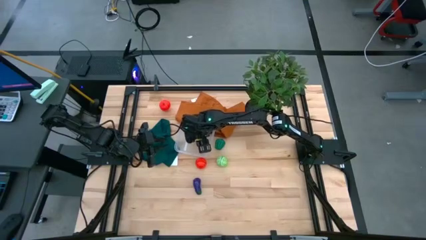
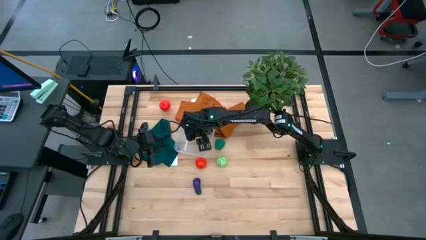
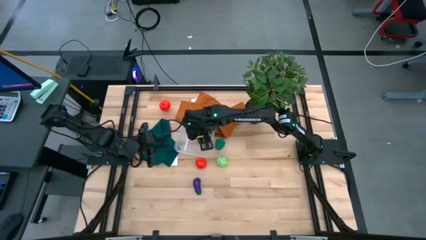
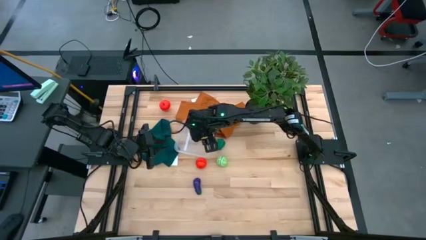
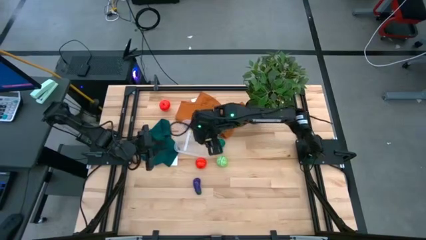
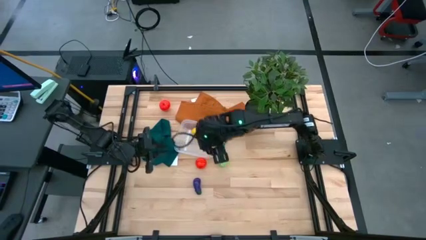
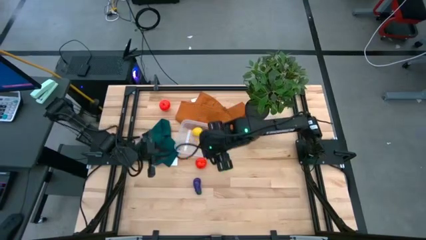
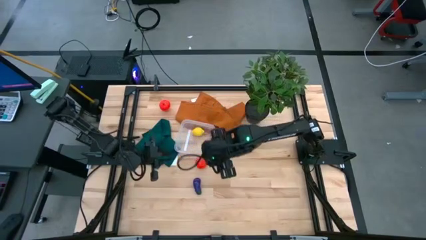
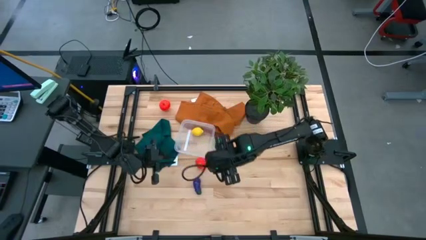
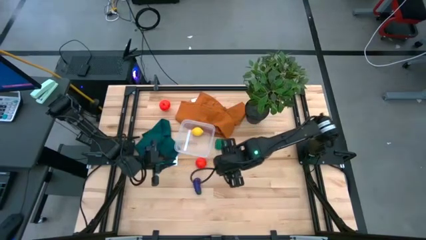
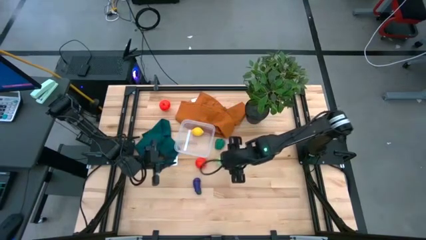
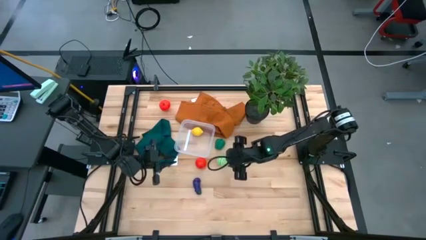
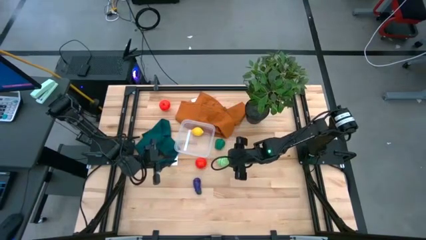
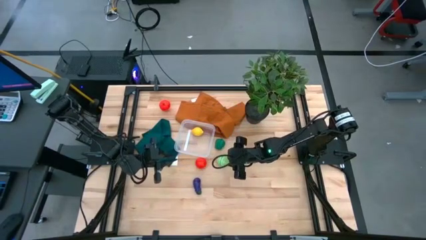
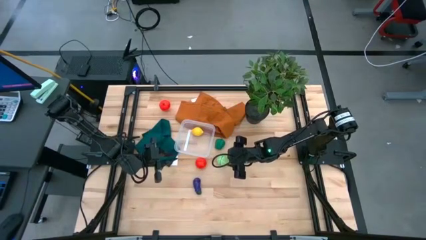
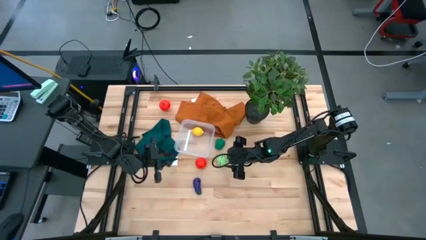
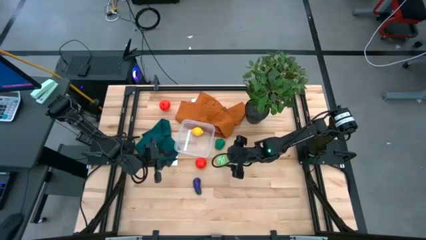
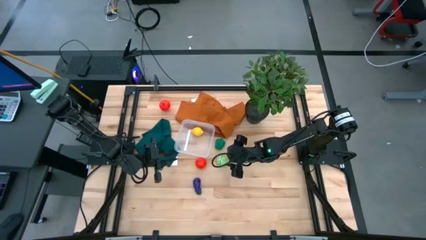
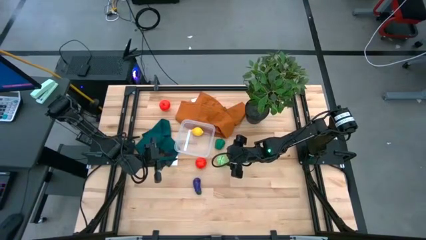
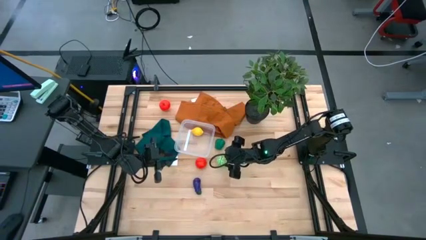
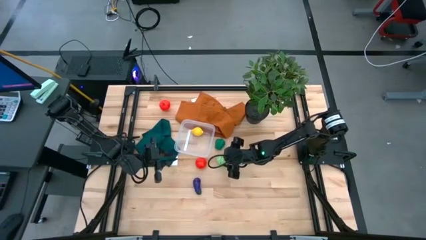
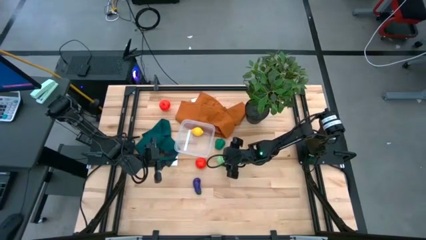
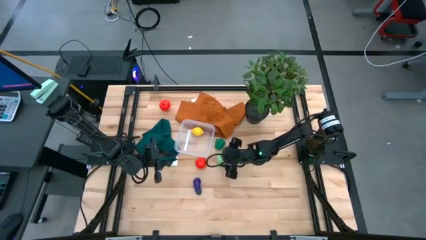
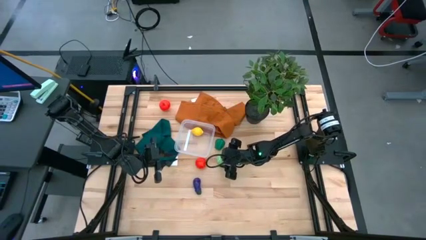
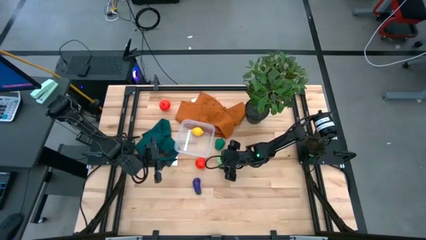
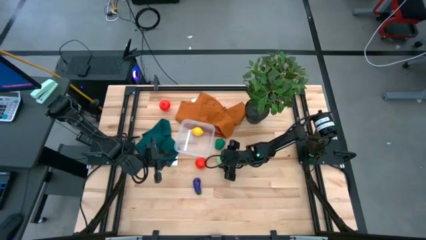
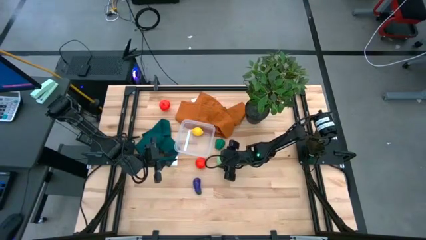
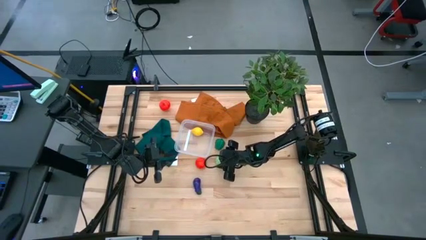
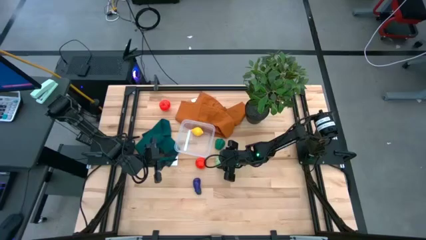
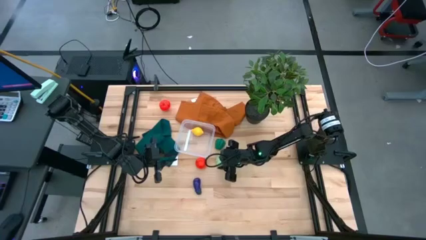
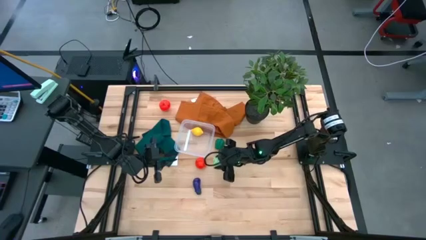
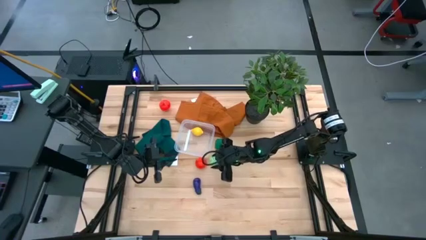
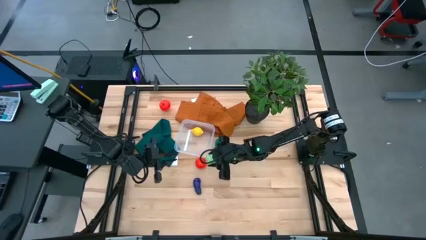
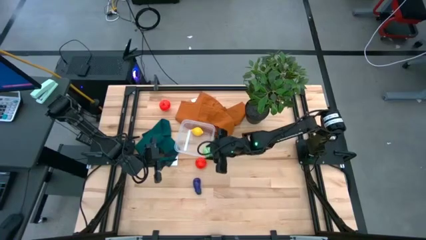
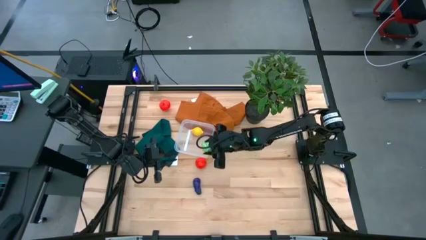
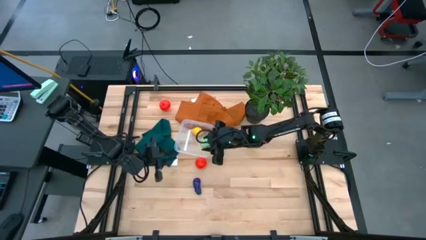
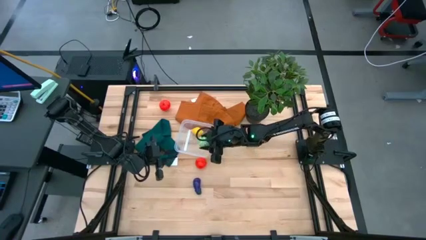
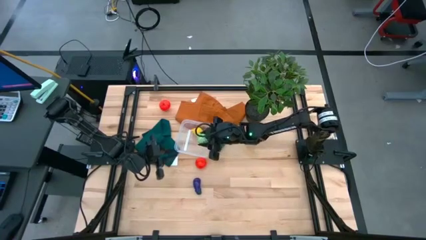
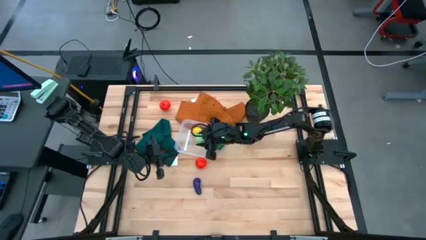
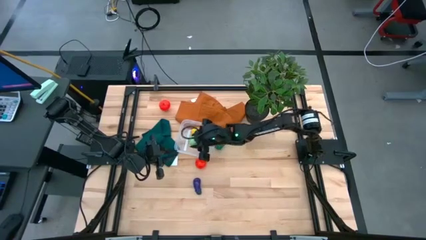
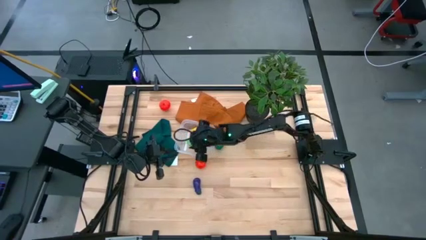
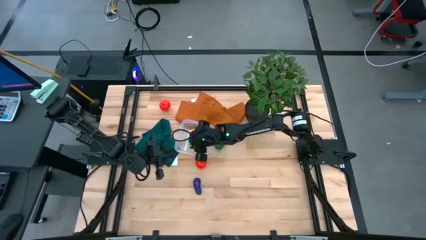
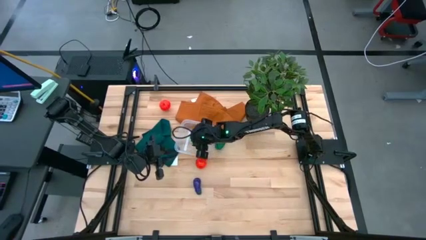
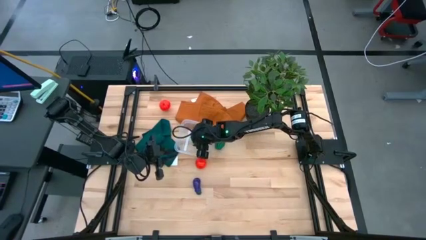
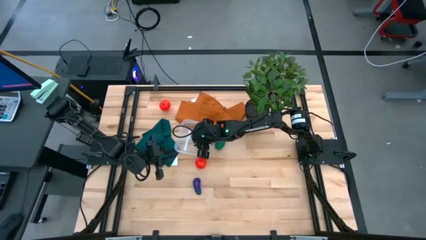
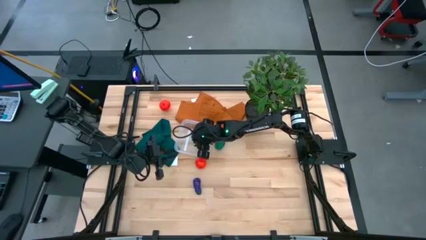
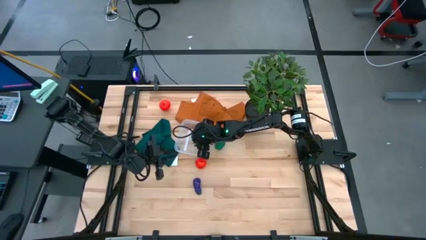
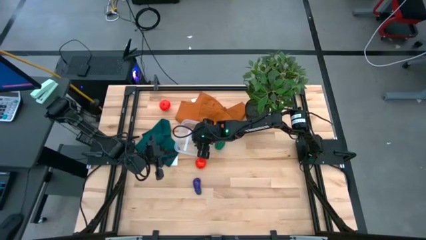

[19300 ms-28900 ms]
Task: Pick and placing Produce into tupperware
Put the green cabbage into the transparent bin

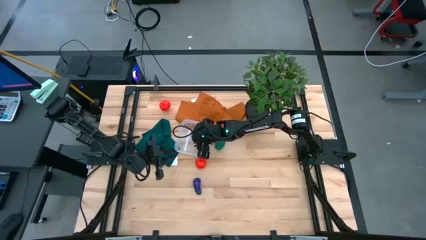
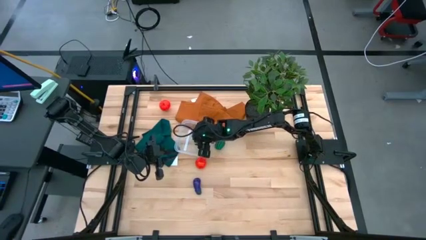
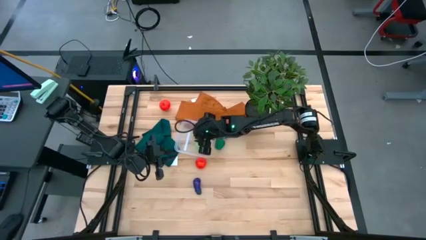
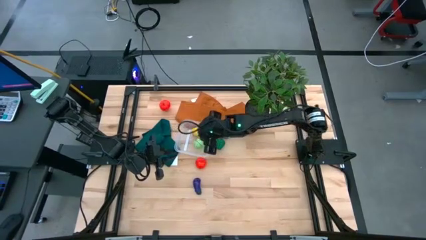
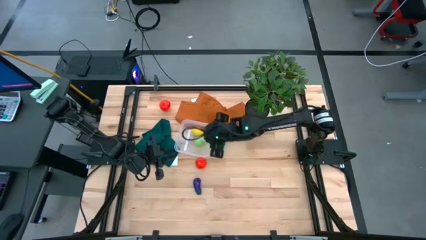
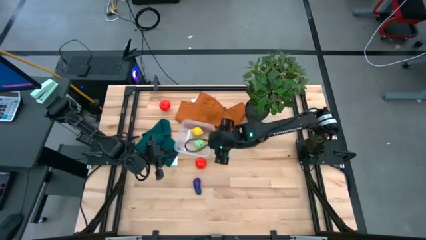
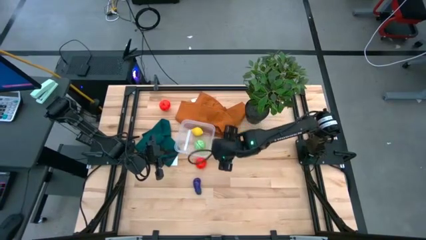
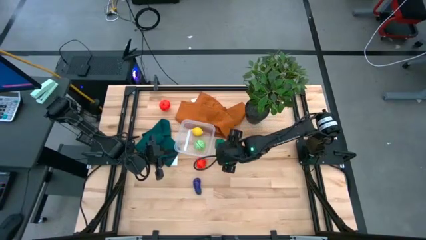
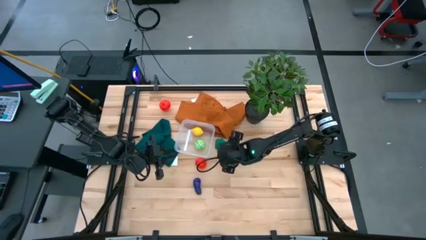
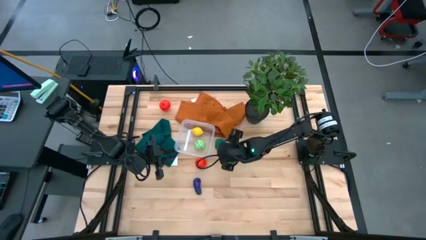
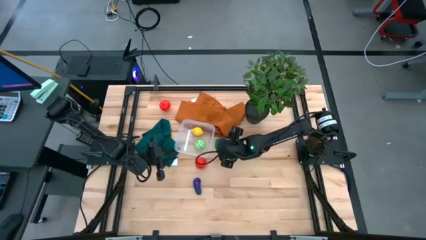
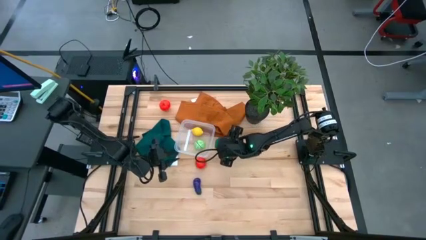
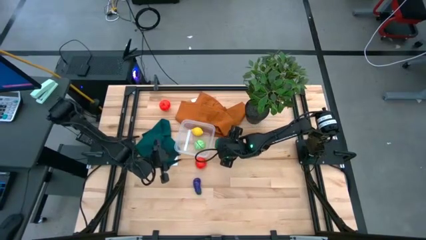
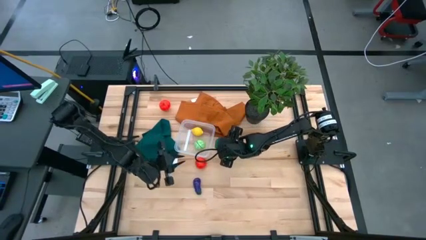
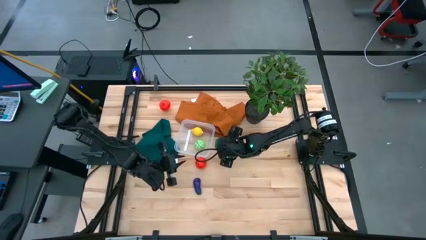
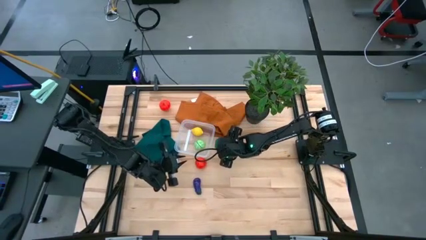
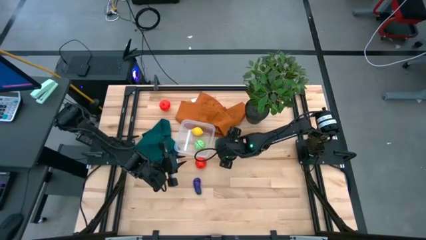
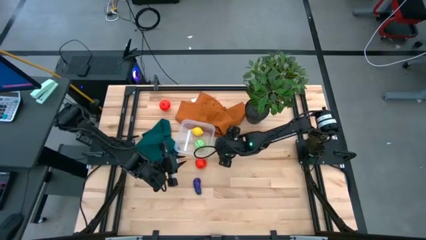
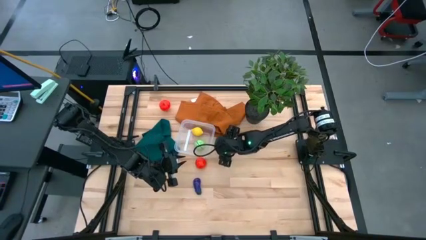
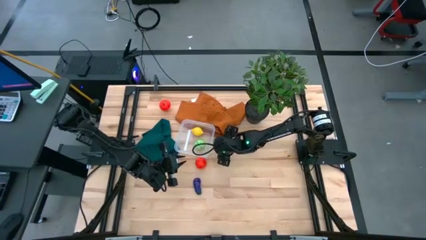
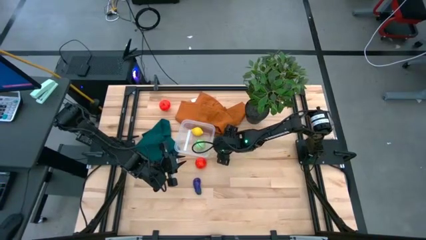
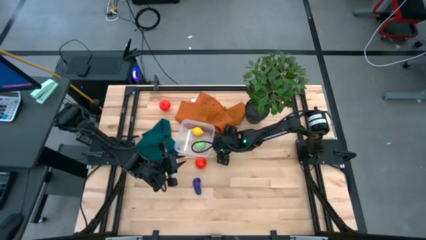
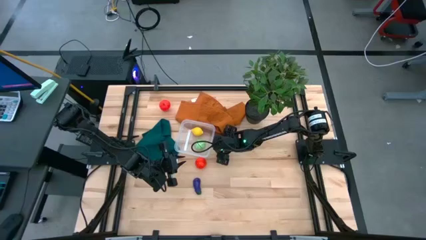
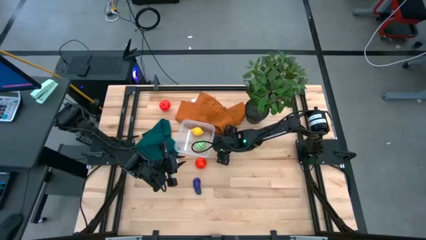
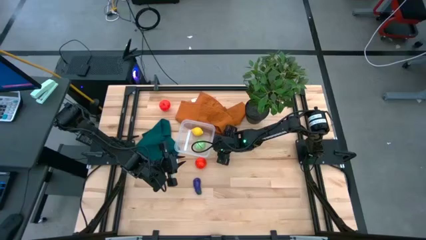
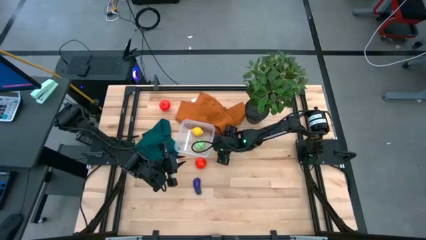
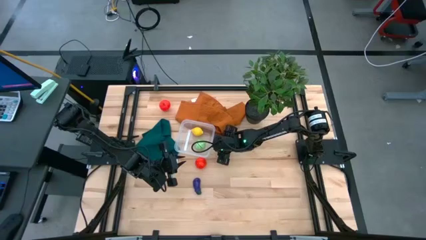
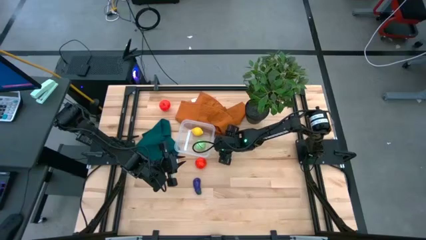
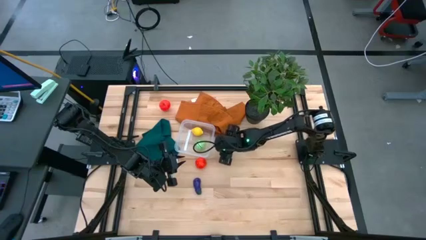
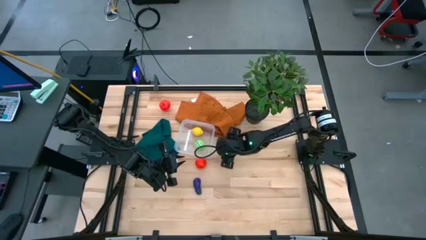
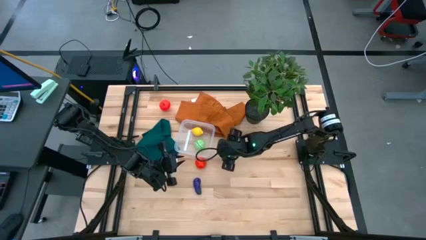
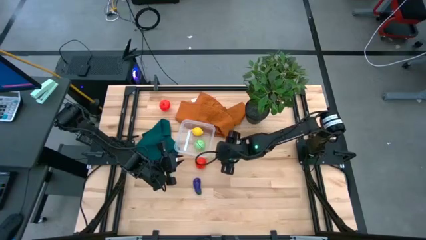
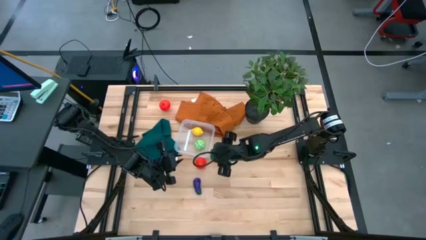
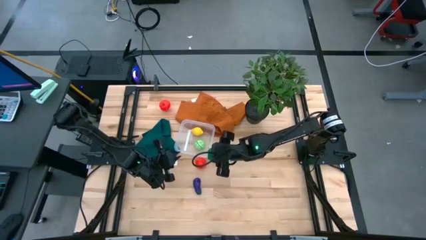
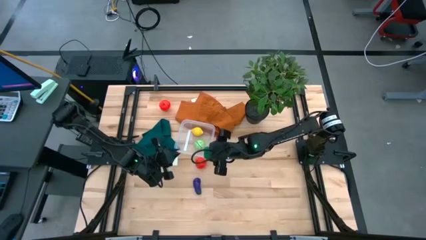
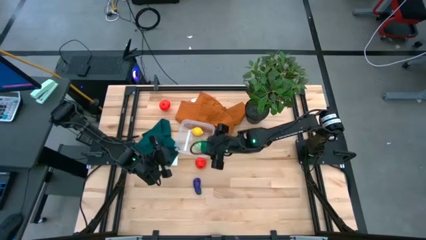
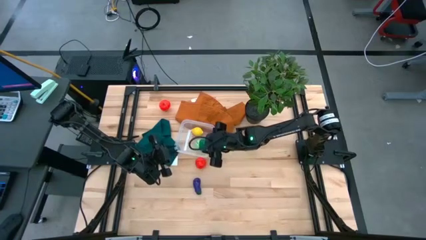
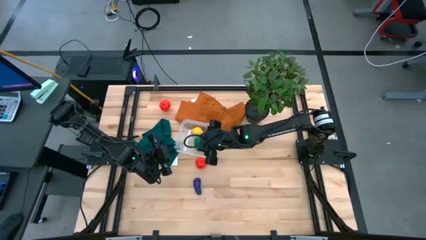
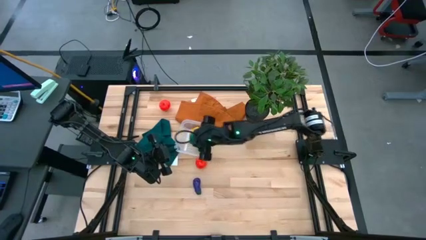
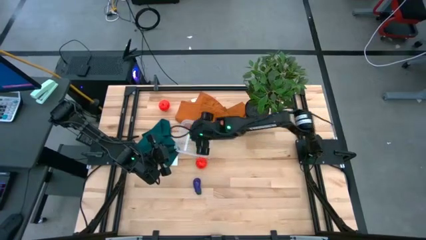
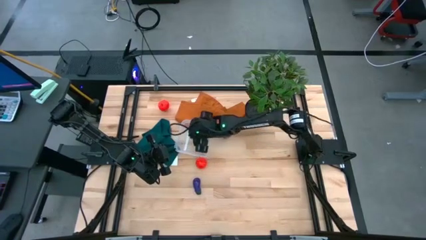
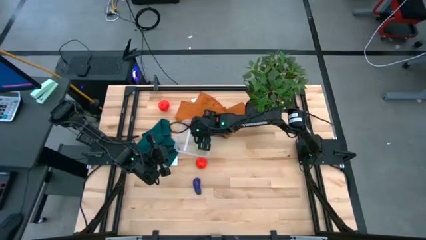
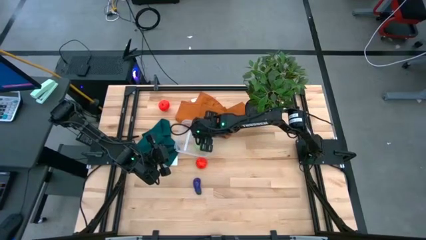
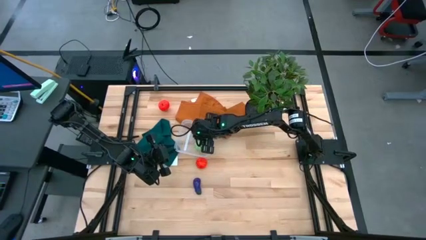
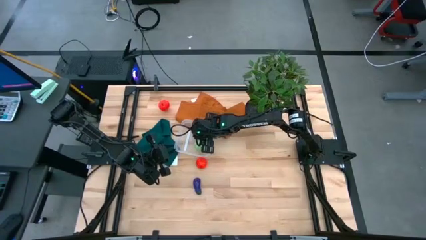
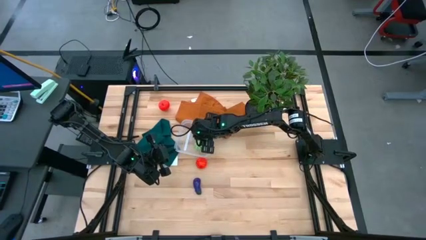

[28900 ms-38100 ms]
Put the green bell pepper into the transparent bin
